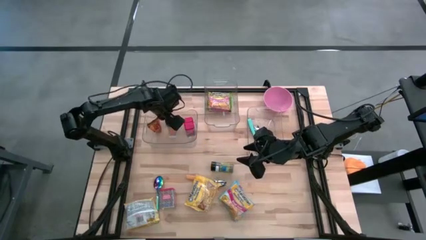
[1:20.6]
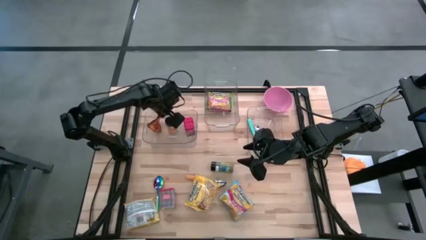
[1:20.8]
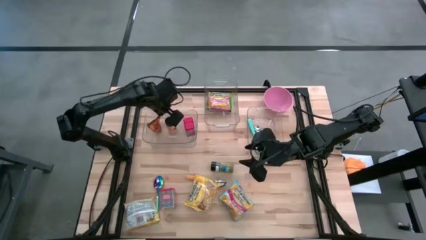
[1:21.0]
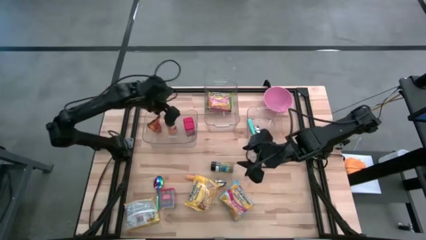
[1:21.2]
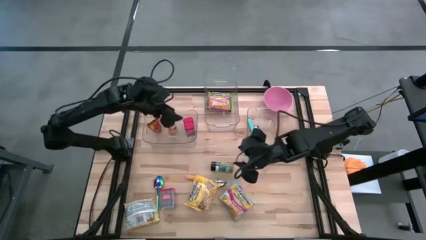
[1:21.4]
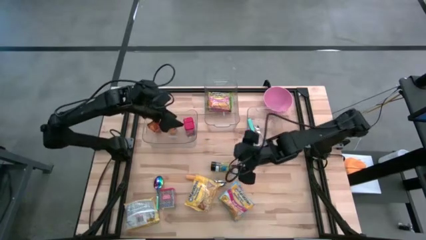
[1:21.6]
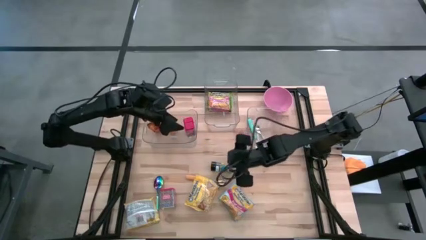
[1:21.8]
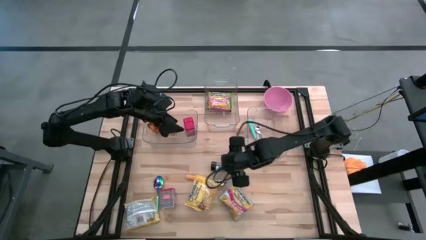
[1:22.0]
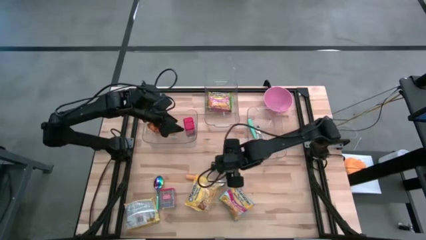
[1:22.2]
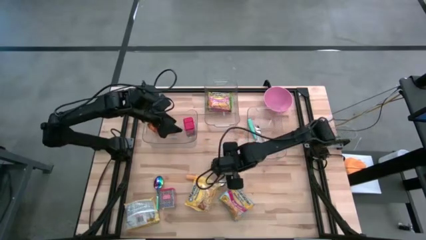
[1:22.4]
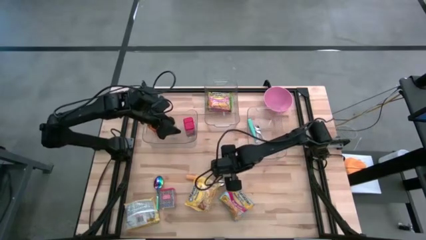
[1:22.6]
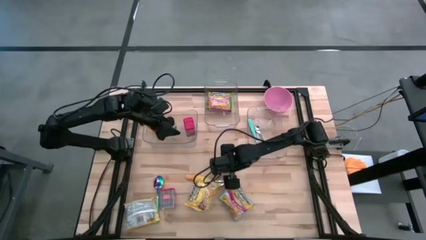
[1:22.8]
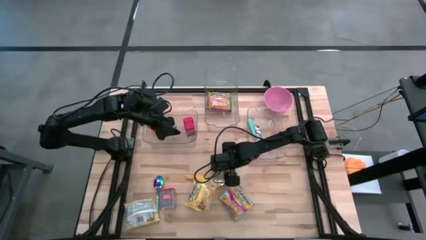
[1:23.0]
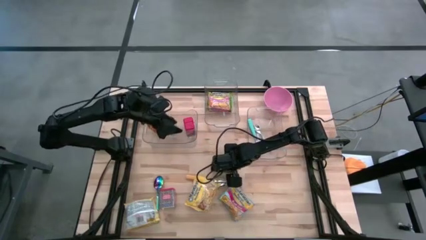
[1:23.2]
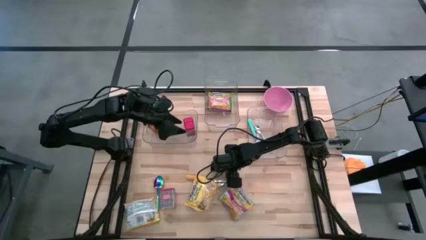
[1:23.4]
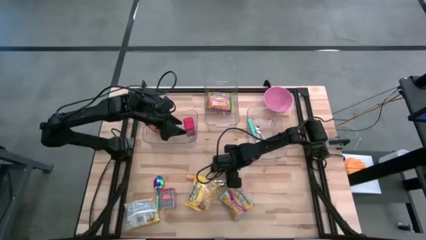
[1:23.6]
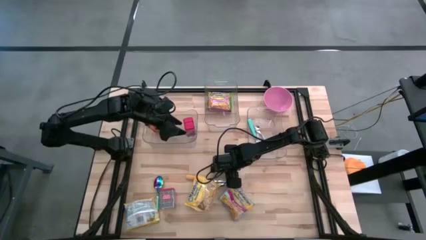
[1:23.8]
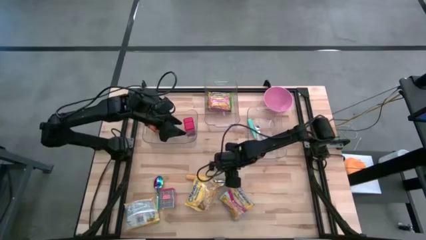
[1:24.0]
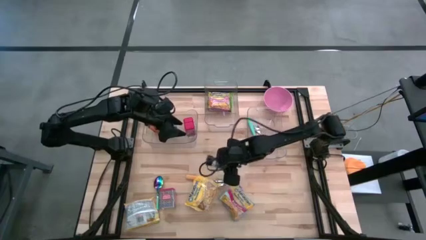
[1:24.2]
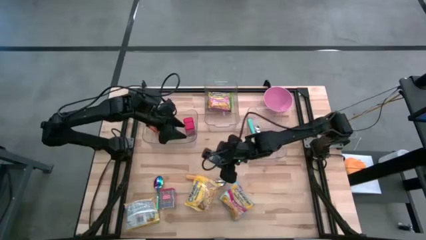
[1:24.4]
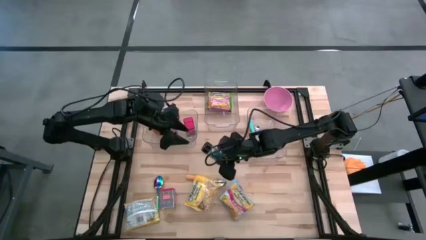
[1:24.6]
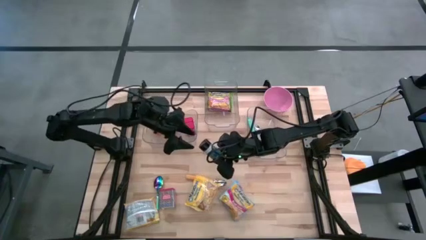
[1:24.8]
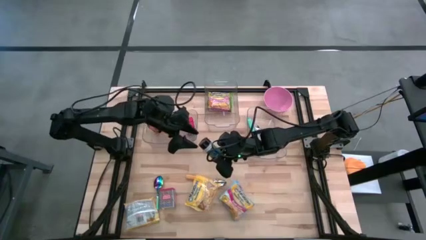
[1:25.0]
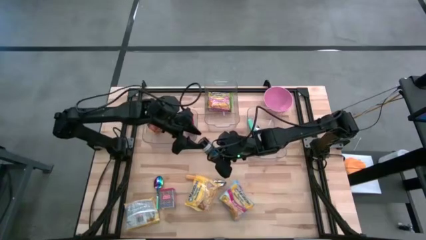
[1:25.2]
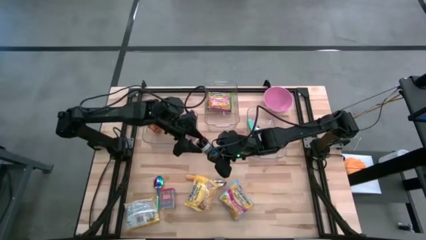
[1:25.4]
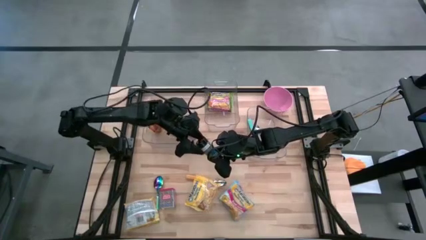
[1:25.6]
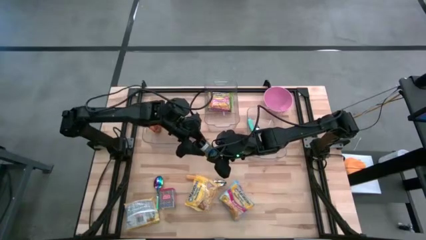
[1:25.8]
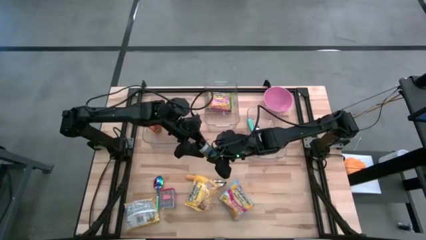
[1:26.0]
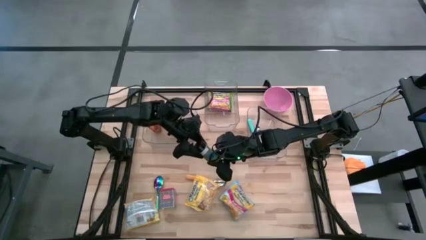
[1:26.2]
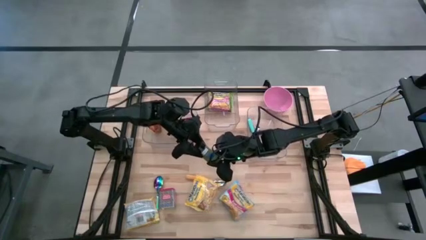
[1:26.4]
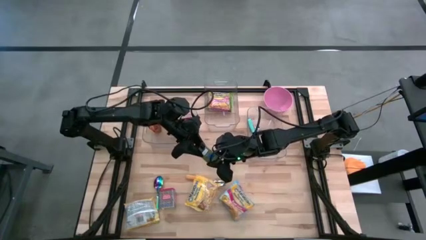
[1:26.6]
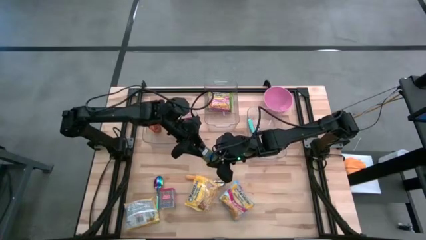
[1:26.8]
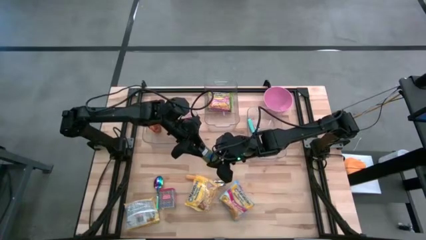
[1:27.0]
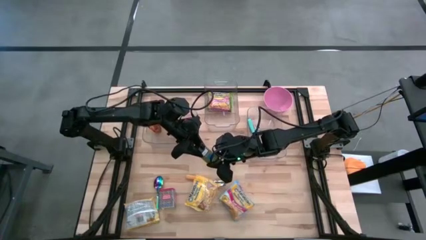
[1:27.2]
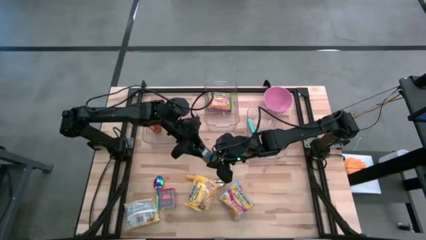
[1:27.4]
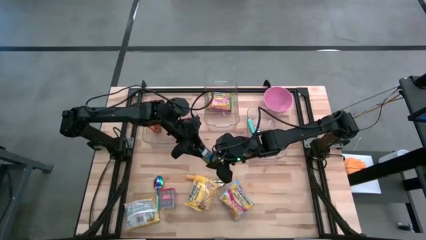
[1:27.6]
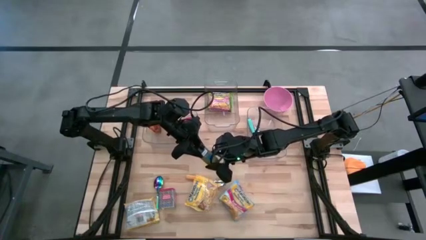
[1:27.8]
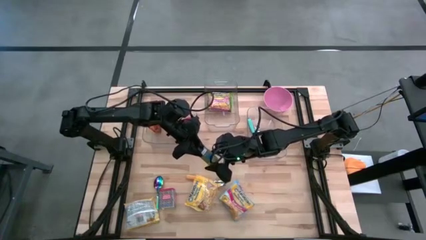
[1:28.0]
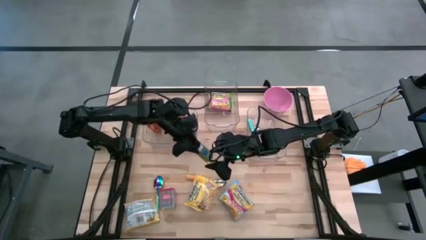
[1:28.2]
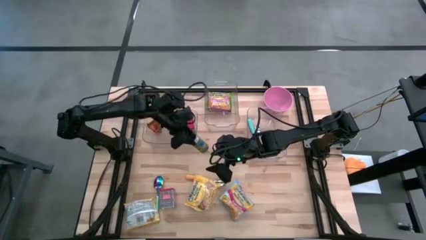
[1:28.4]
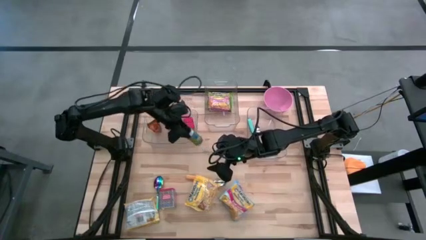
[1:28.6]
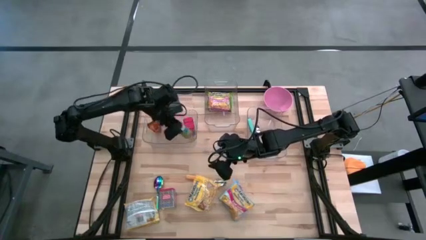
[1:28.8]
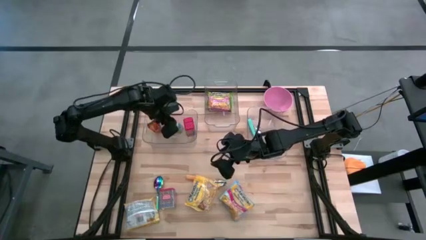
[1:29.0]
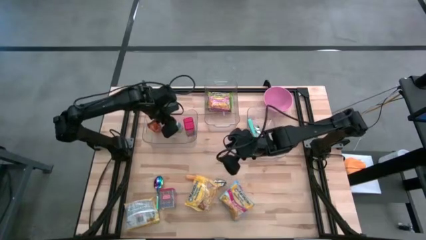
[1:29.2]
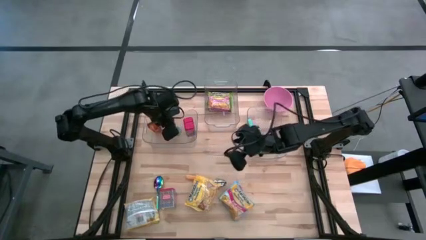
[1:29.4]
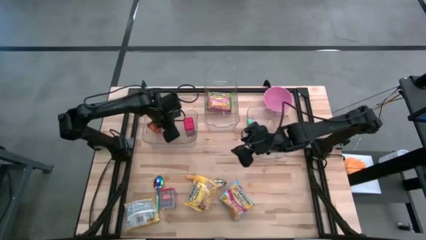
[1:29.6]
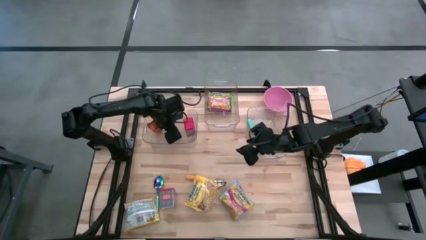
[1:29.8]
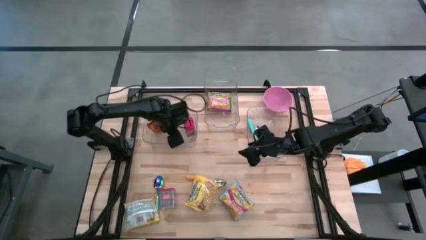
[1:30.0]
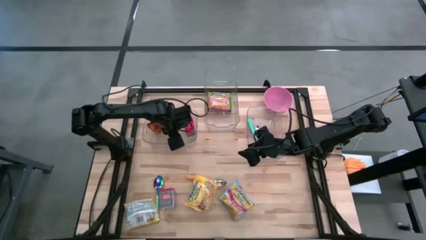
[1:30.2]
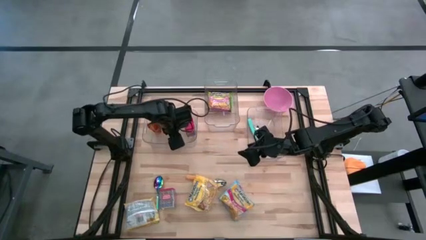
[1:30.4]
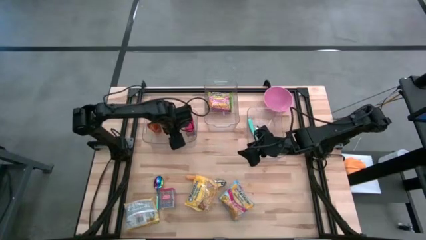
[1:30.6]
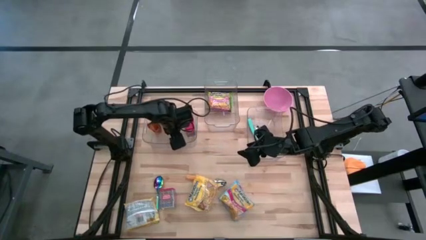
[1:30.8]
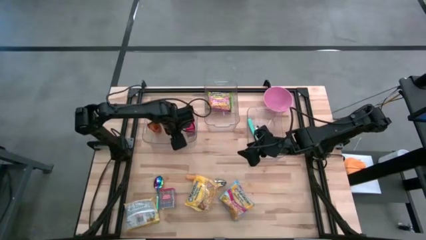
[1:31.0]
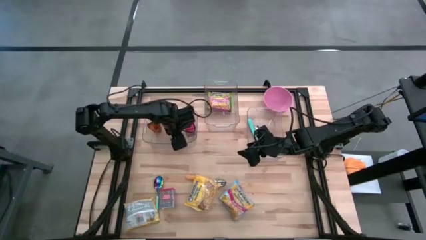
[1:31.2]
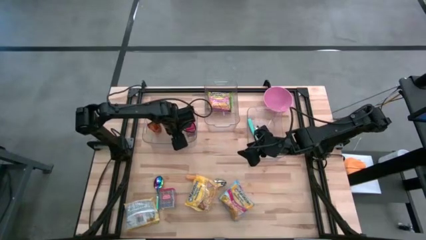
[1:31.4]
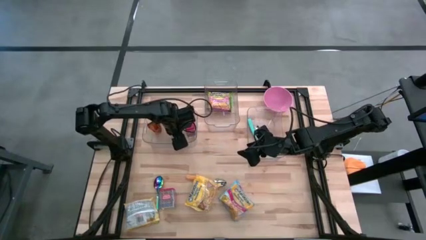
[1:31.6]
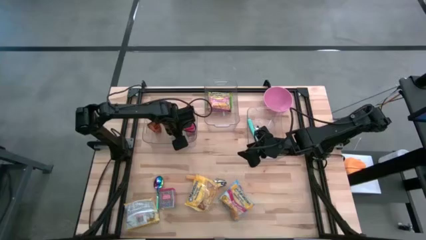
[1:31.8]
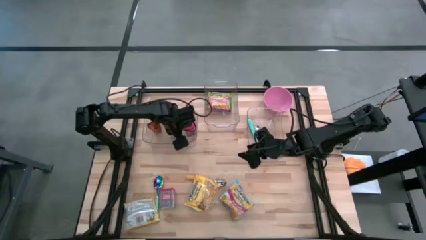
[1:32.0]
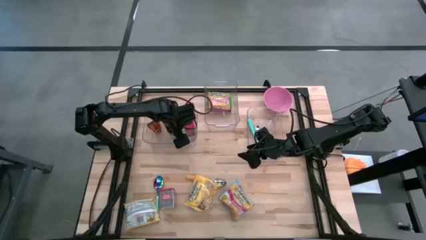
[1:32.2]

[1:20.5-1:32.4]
Put the green seasoning bottle into the left transparent bin

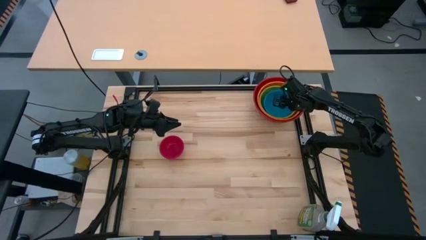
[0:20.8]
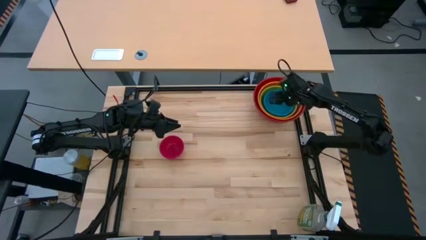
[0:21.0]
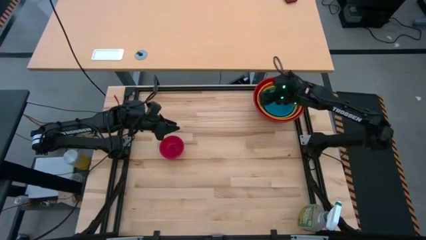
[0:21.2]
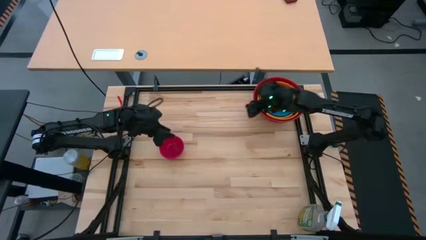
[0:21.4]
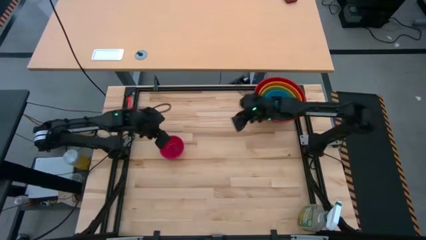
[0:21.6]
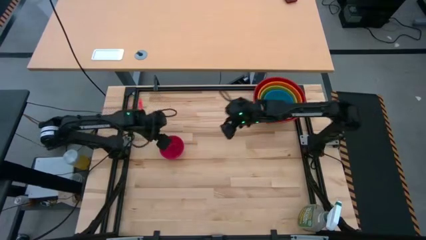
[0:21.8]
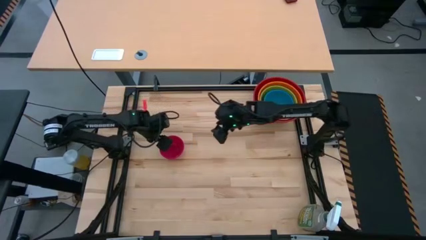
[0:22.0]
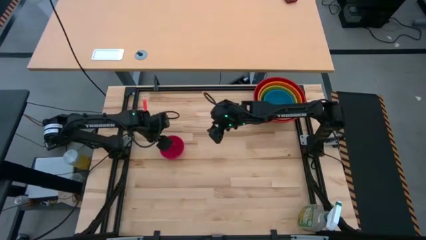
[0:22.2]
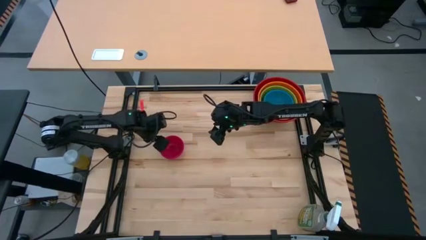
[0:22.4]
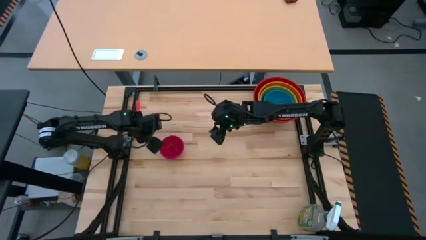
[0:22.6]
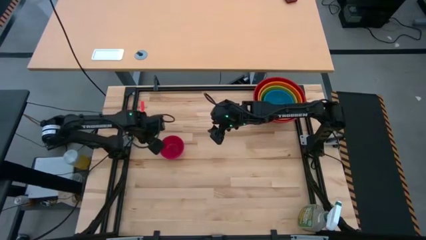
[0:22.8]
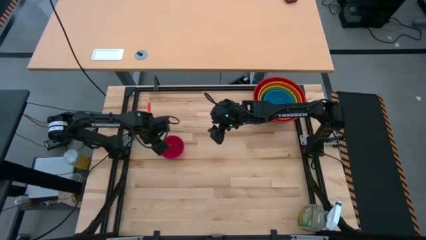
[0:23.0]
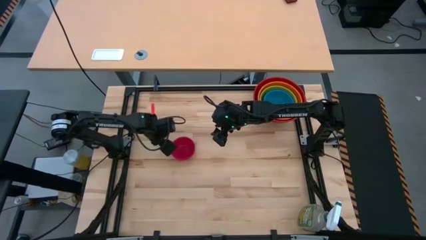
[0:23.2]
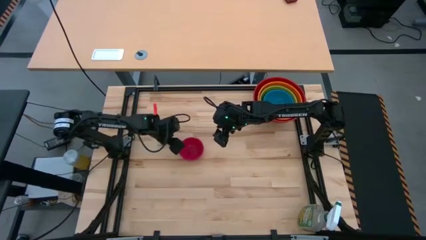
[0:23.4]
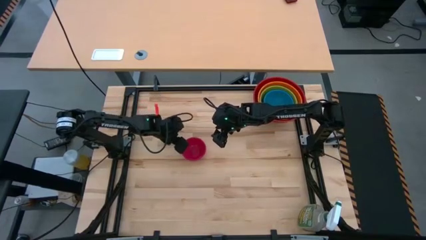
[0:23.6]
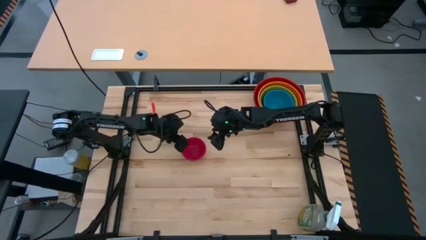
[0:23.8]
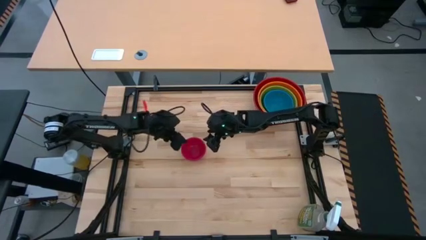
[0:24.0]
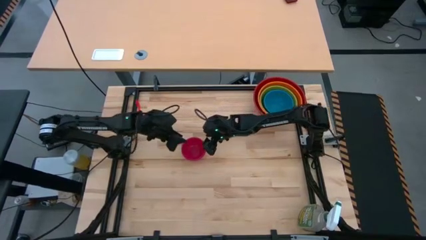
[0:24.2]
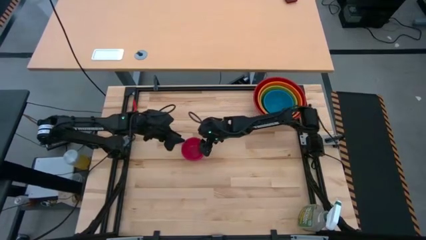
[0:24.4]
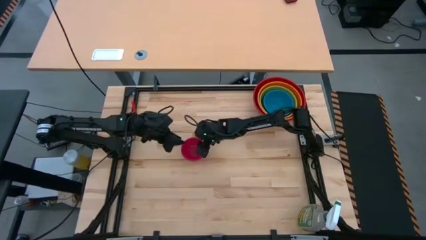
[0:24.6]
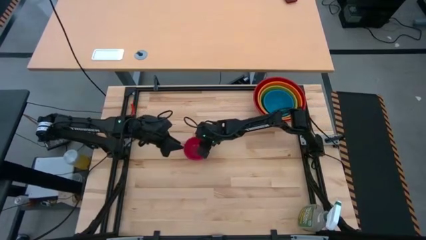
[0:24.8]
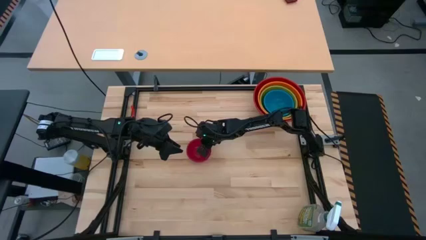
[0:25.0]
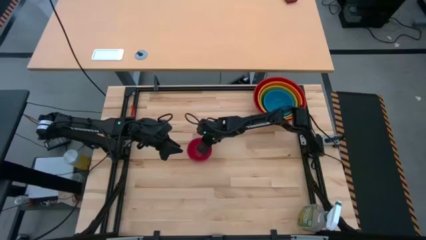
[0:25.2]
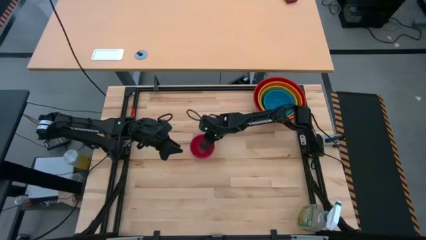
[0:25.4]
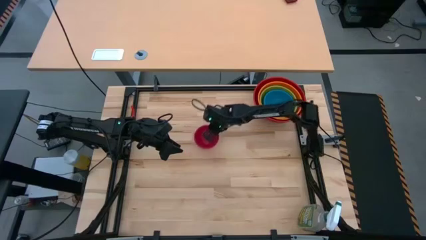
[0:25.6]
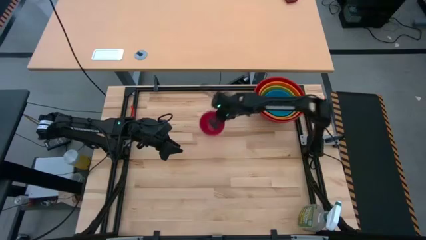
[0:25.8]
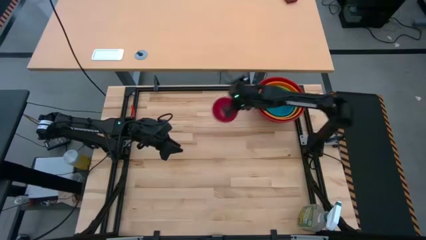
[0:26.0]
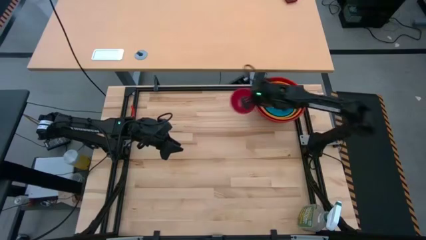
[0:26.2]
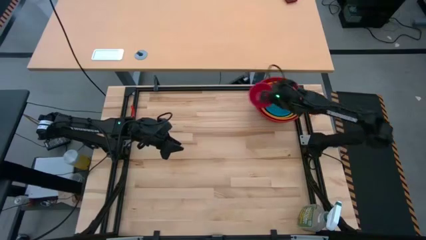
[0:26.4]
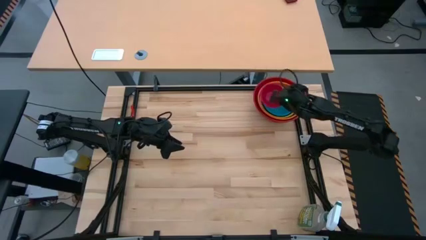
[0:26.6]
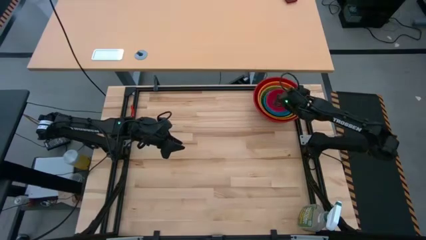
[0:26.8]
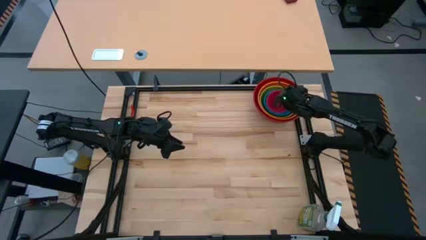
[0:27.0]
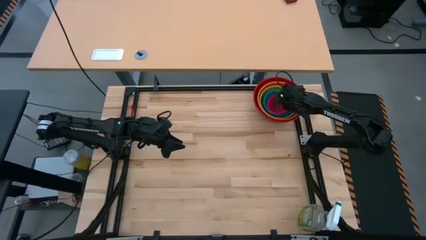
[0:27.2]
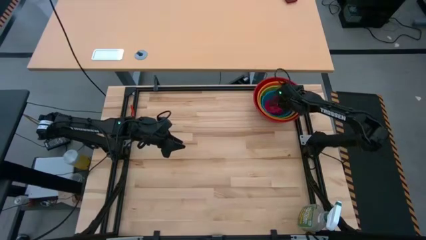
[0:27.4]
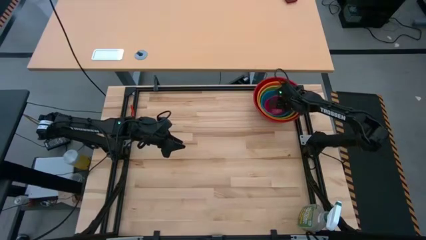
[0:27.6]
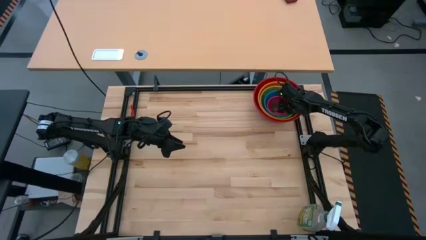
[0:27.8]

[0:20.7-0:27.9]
Stack the pink bowl on top of the blue bowl
